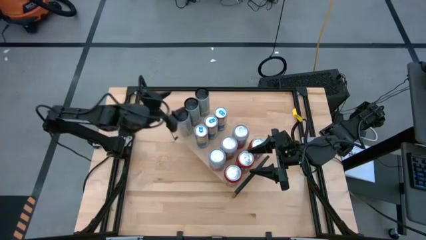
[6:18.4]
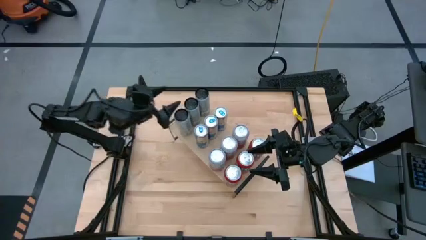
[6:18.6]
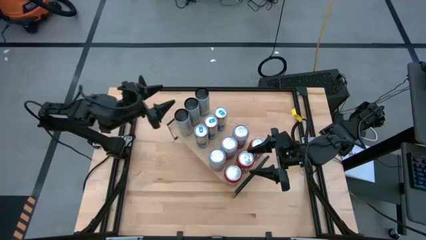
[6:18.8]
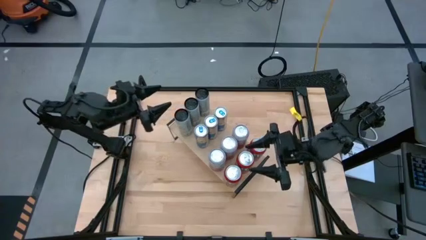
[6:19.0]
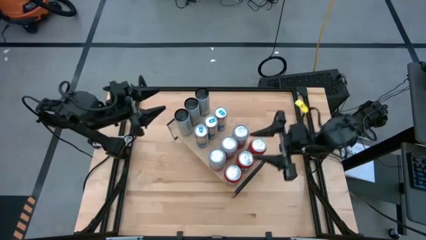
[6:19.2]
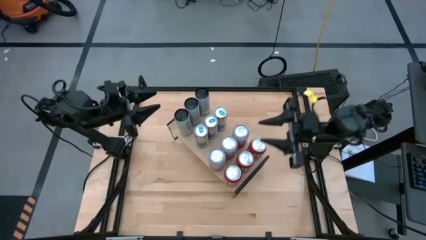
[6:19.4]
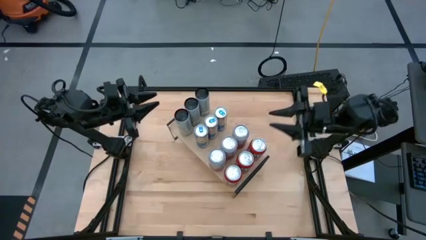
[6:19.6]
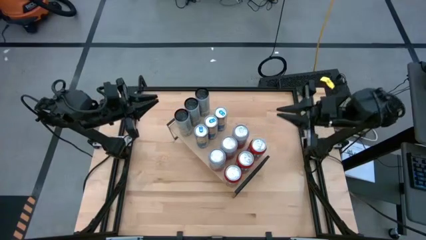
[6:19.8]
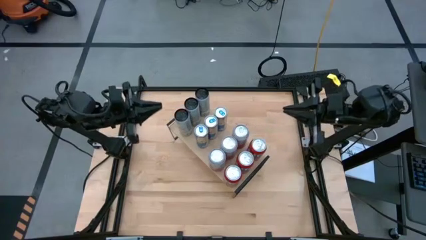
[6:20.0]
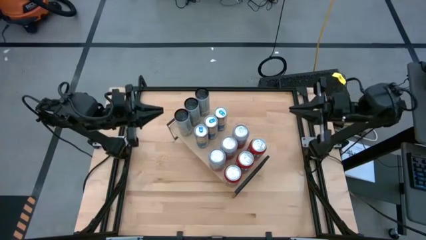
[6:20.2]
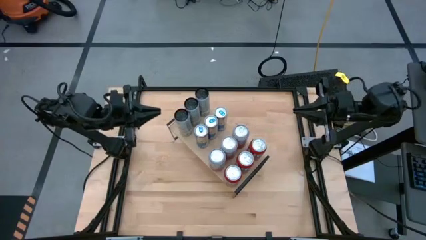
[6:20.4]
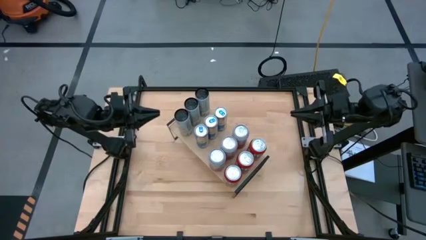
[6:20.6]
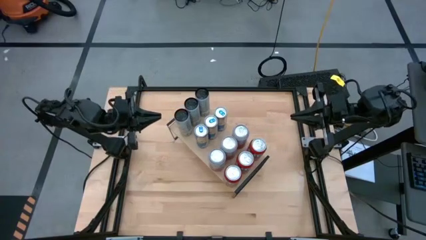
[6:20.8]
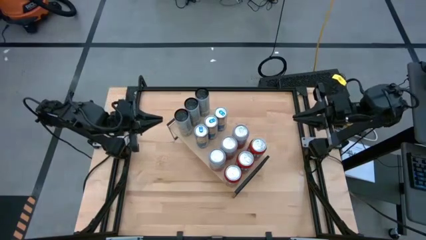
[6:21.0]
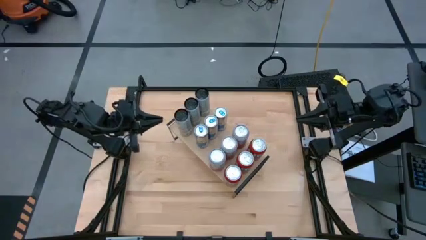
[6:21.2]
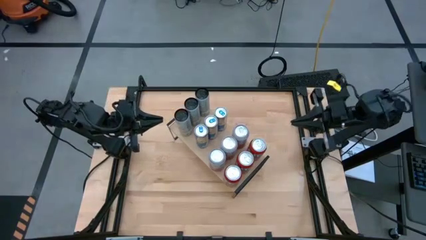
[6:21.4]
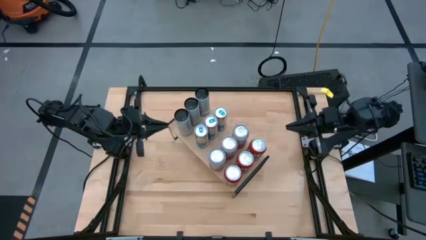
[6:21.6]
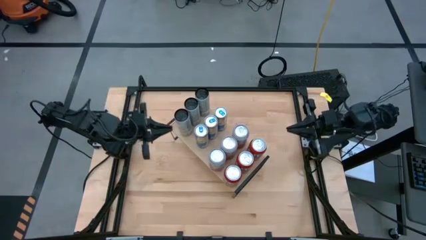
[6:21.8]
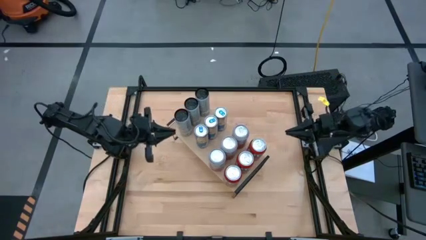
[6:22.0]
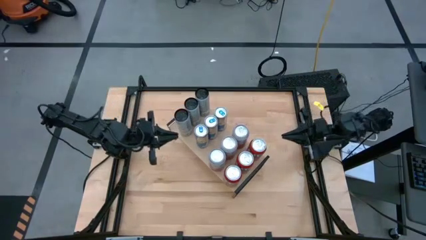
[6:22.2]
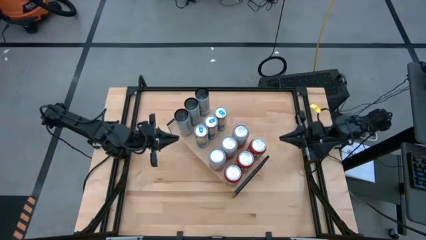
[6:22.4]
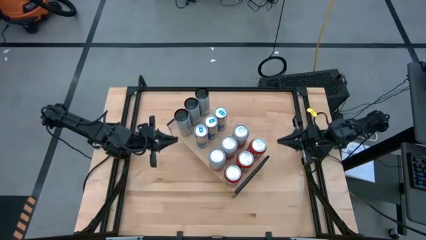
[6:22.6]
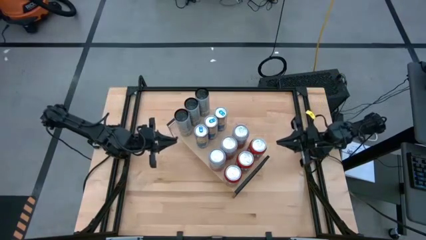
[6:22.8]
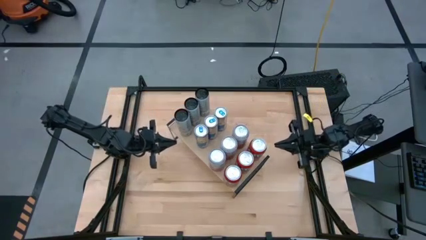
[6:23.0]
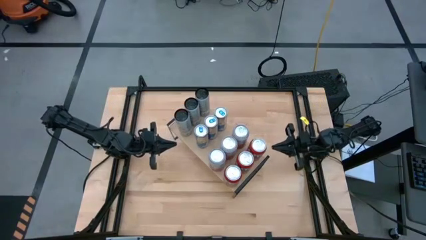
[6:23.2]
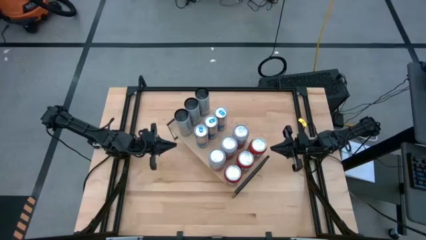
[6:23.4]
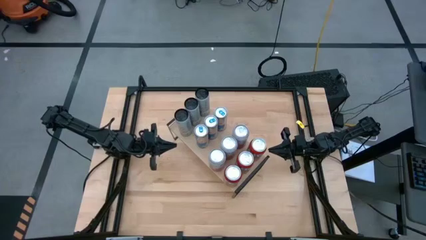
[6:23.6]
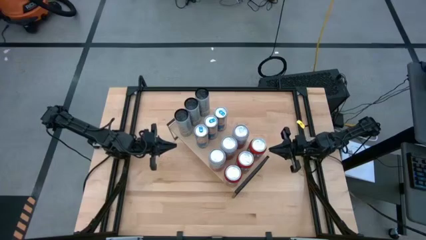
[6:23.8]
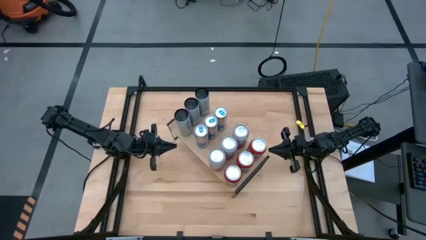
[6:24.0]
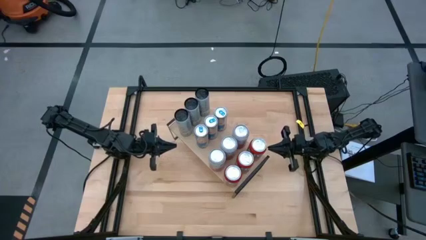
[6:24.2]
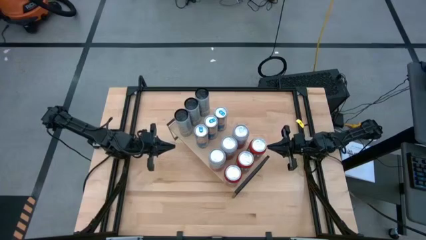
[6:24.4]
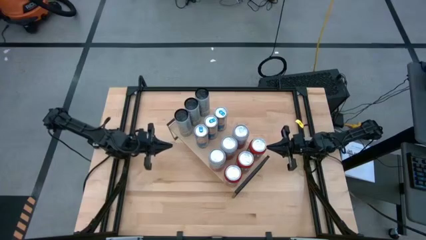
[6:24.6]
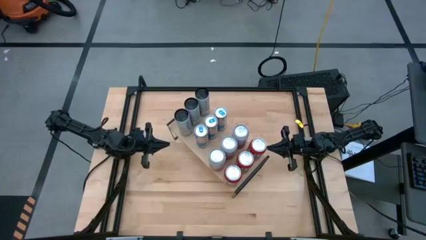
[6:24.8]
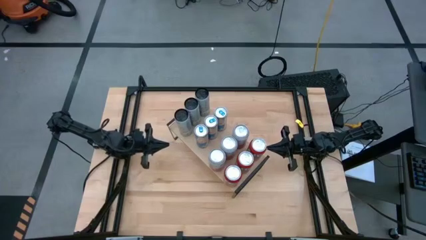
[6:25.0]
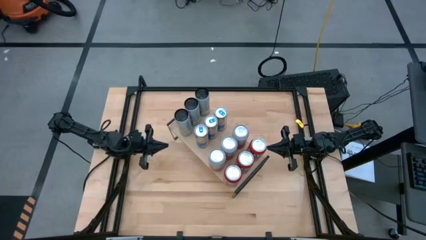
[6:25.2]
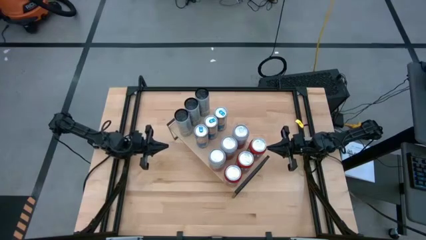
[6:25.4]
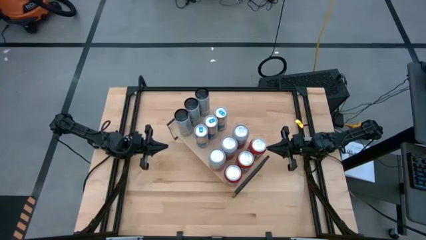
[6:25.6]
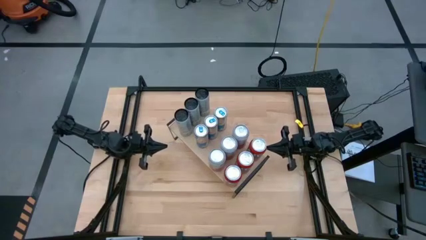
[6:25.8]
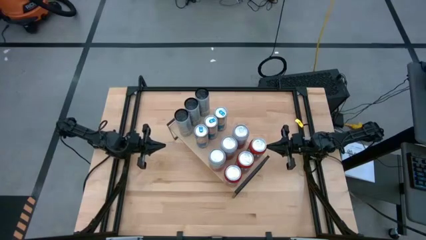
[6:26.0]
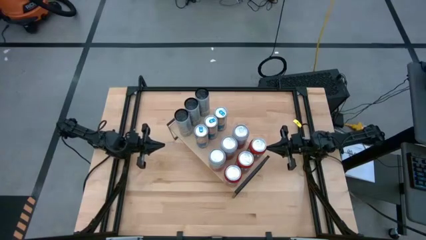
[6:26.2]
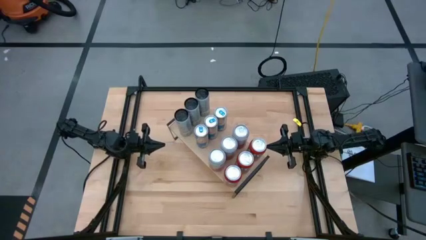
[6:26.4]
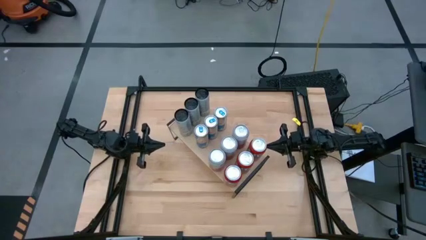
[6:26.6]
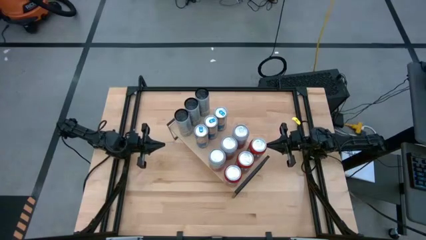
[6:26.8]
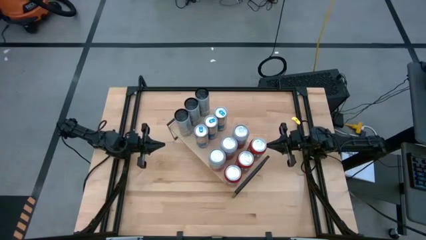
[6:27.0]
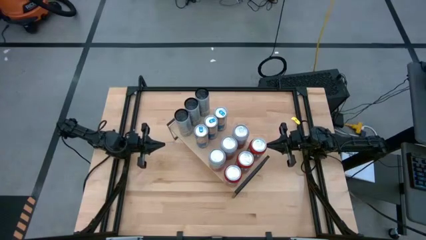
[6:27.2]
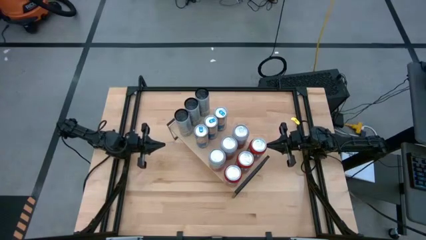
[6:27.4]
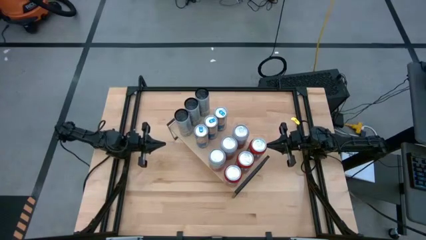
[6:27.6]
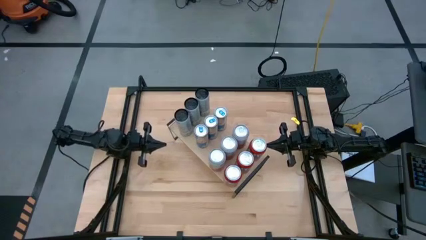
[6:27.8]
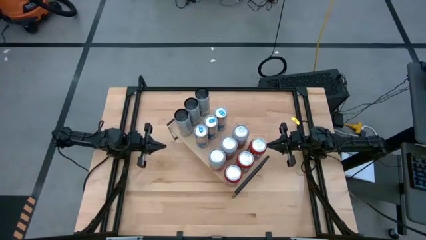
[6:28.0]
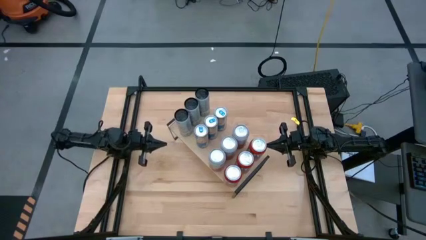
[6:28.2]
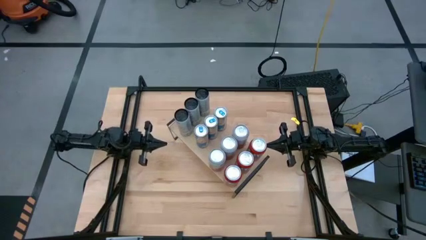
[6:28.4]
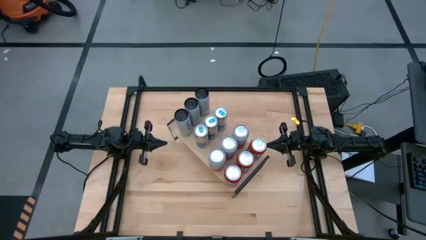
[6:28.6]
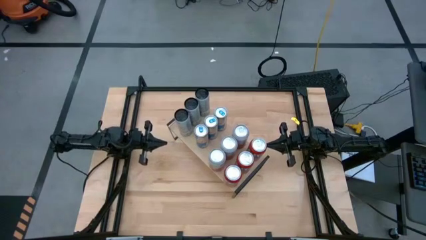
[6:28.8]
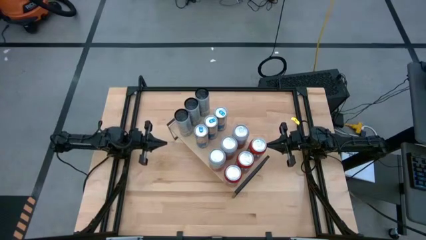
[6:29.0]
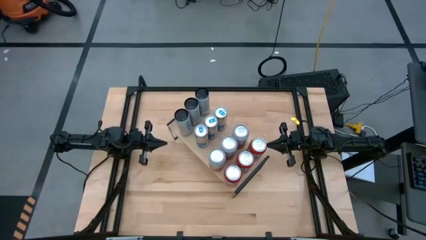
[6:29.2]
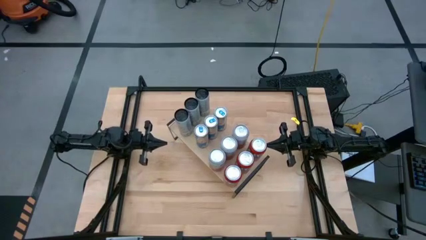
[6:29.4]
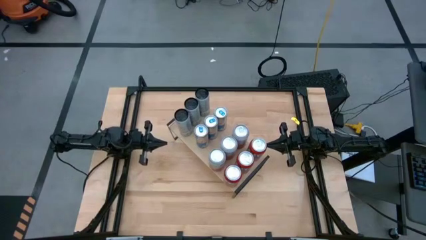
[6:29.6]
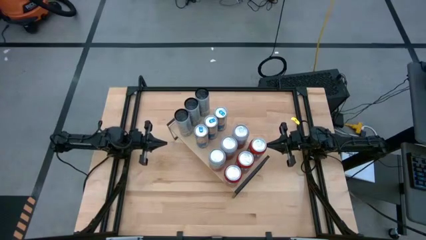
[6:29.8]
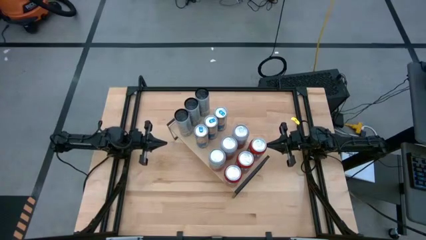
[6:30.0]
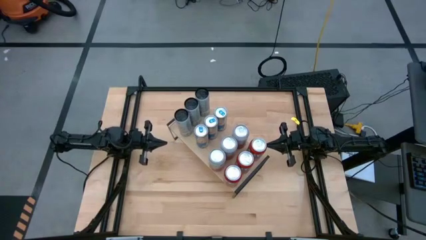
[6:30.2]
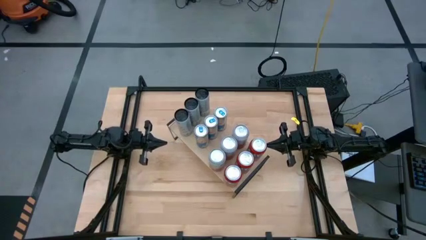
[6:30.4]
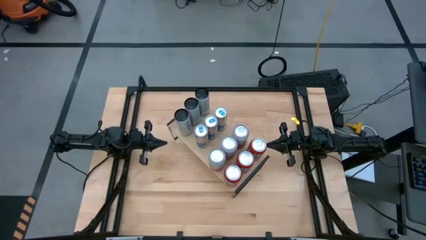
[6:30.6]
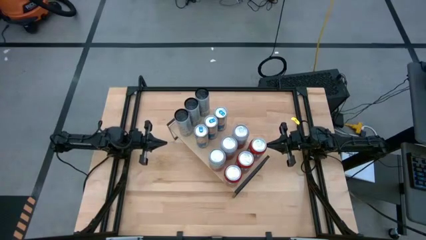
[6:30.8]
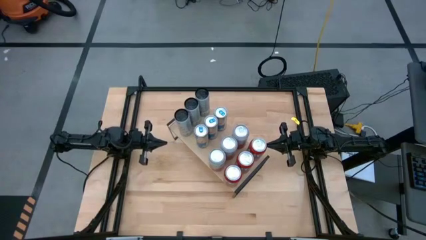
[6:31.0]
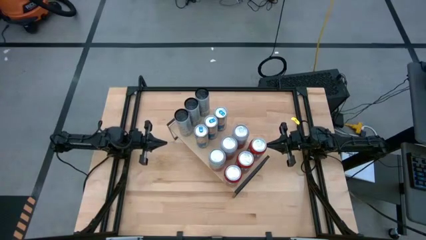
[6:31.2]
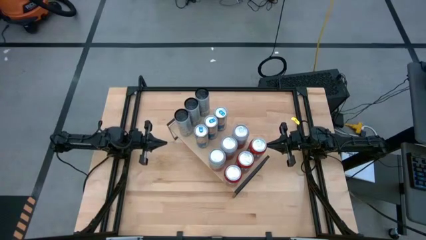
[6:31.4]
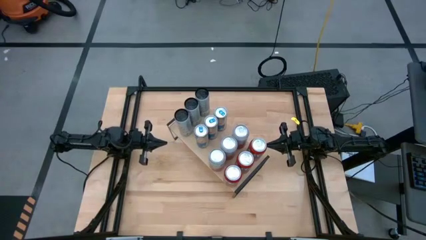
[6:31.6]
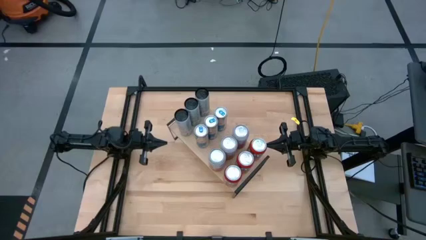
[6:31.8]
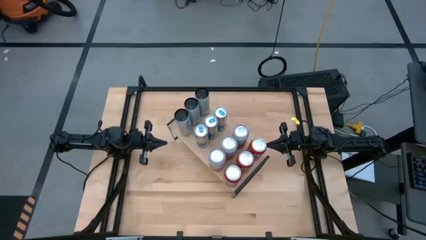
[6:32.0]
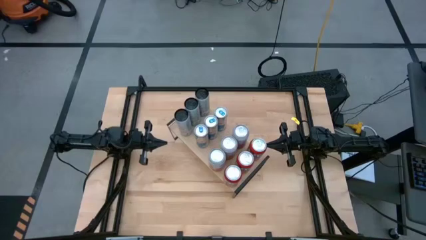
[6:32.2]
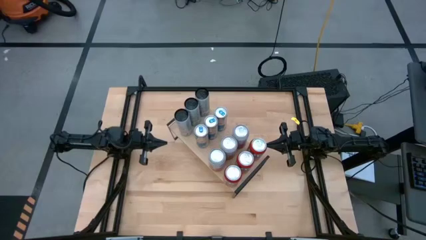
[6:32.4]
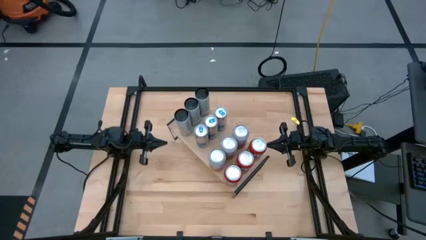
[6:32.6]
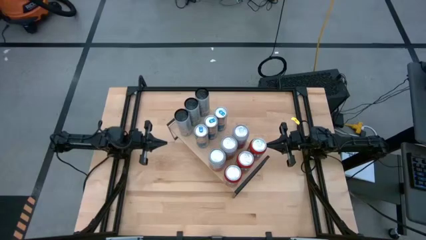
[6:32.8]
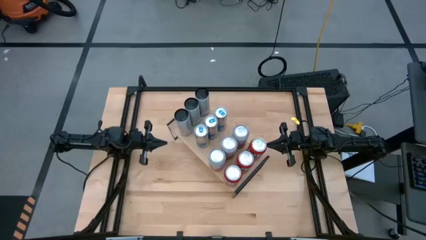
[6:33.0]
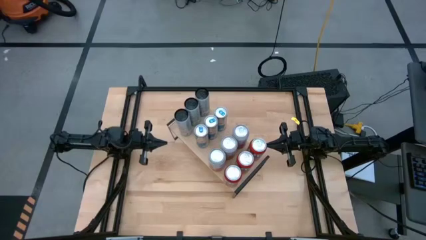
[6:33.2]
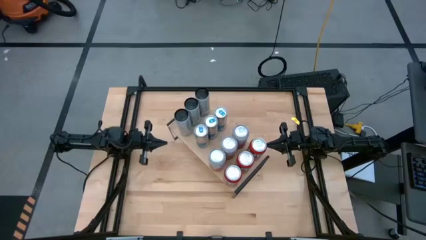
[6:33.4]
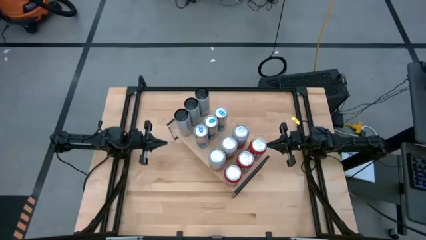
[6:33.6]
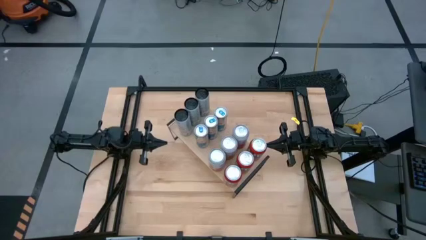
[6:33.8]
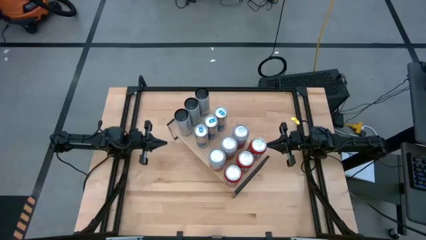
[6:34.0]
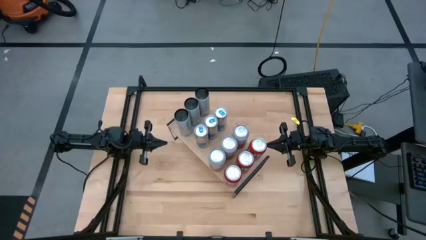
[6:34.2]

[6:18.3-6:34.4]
Task: Place canned beverage on shelf
Return to Home Position

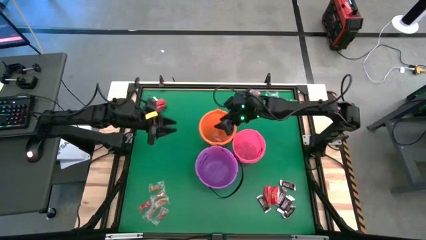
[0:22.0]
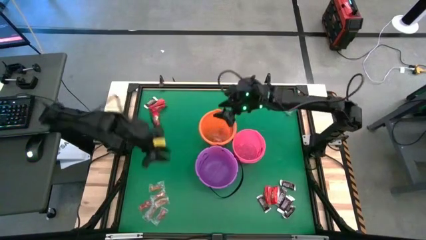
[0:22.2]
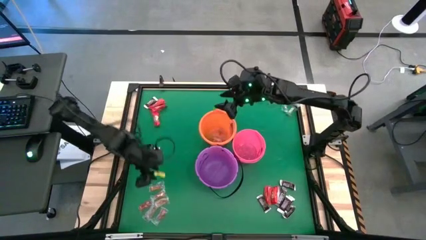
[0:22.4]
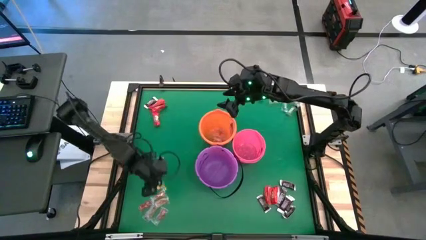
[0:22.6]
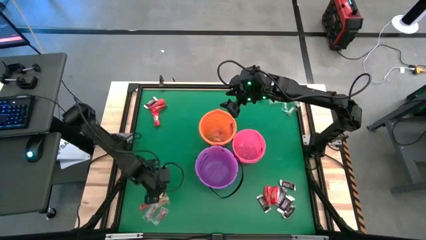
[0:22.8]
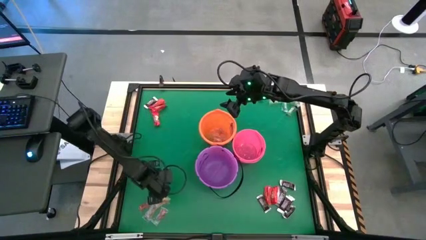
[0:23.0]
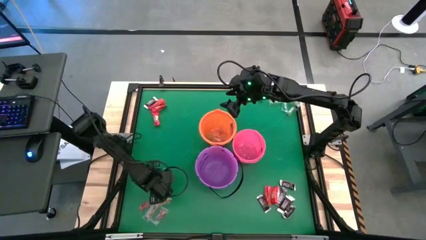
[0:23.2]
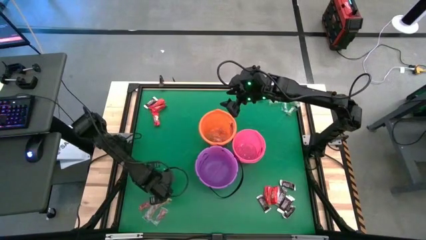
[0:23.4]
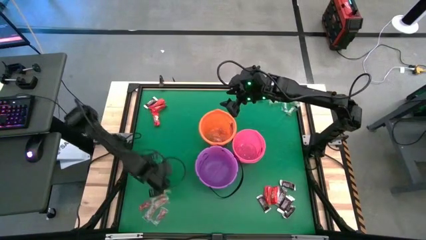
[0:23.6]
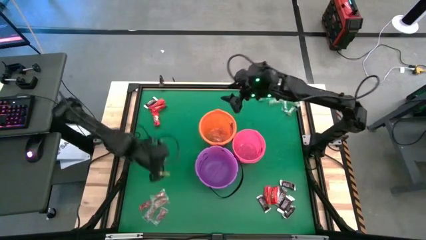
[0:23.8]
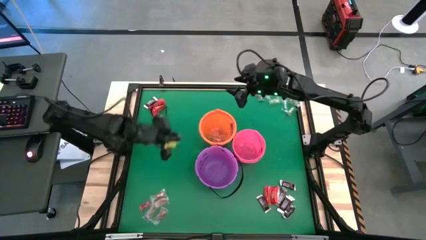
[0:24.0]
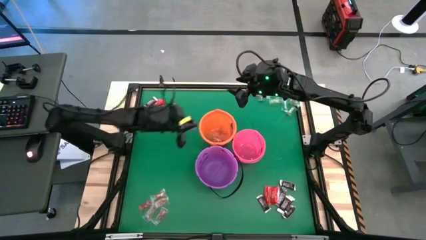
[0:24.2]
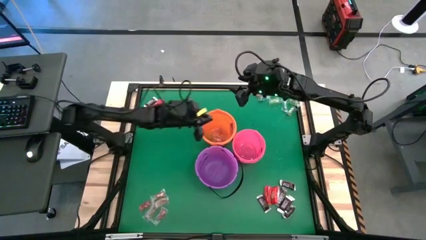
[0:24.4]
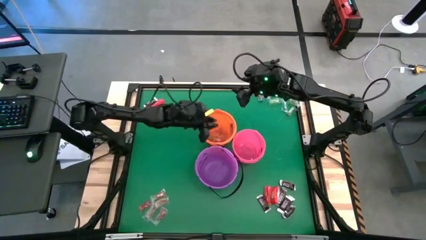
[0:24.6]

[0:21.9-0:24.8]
Task: Sort candy by brand, put in halloween buckets
Put the orange gummy into the orange bucket
